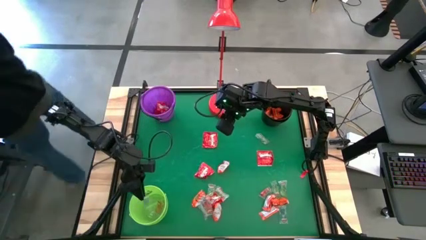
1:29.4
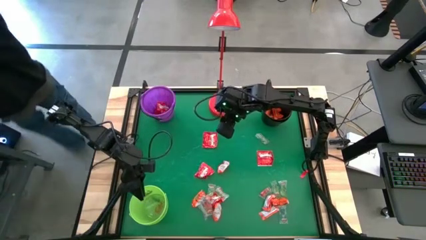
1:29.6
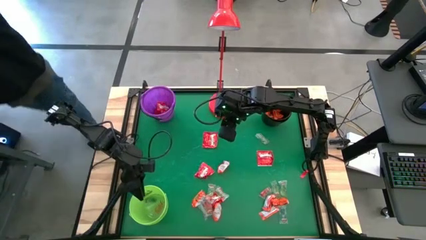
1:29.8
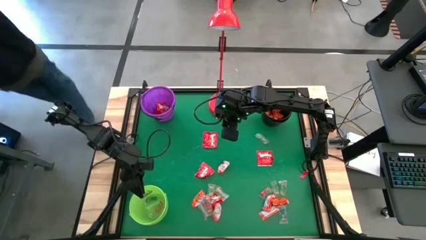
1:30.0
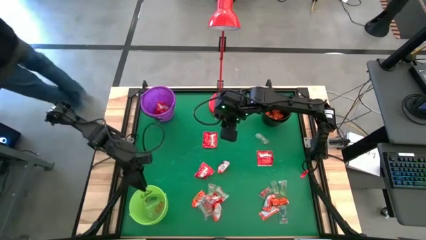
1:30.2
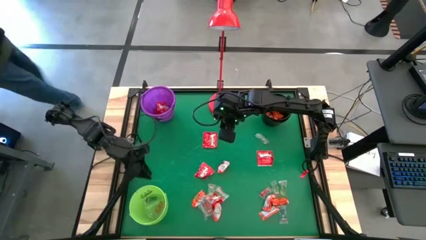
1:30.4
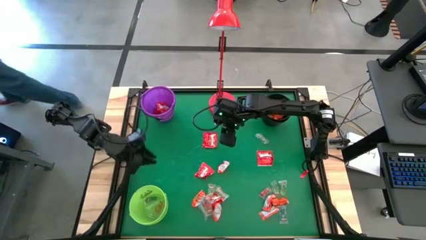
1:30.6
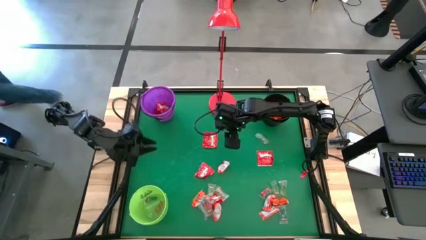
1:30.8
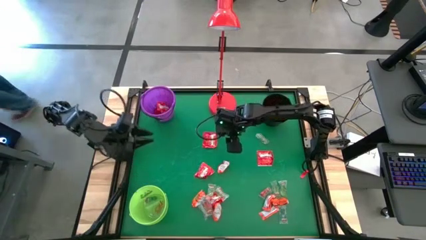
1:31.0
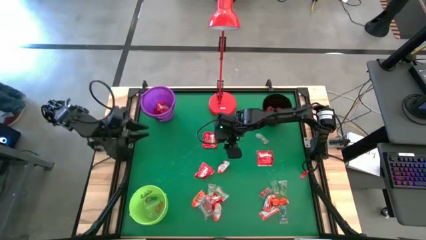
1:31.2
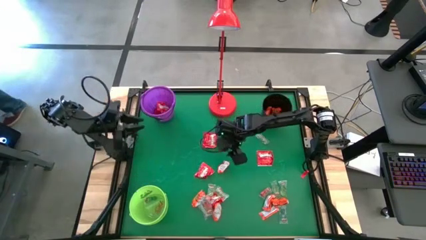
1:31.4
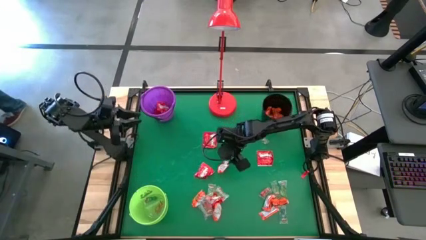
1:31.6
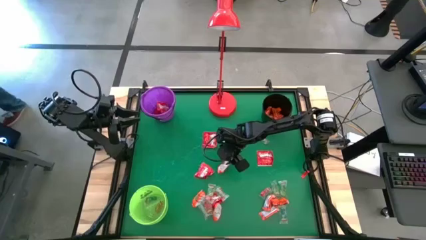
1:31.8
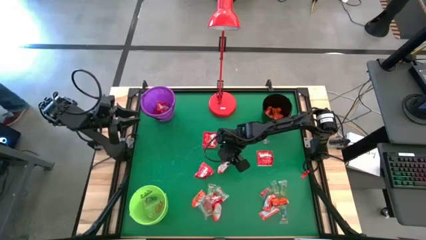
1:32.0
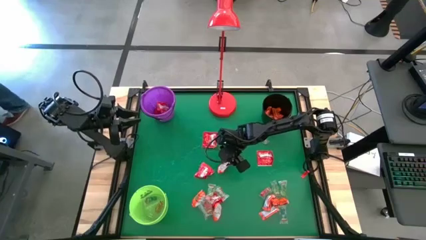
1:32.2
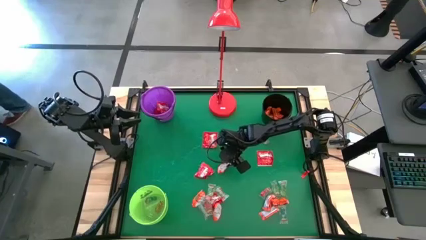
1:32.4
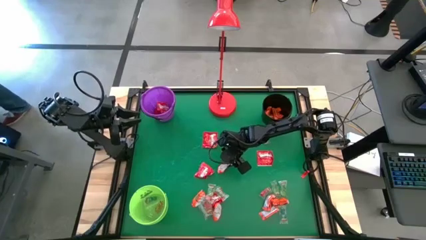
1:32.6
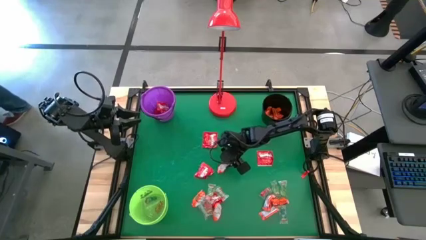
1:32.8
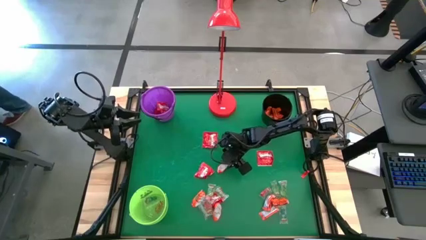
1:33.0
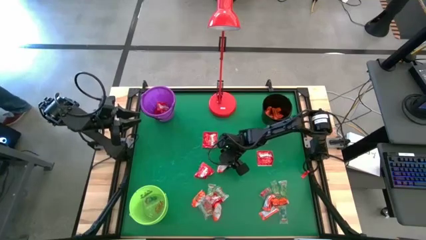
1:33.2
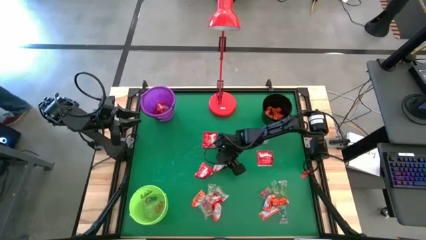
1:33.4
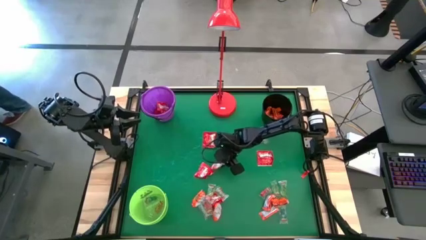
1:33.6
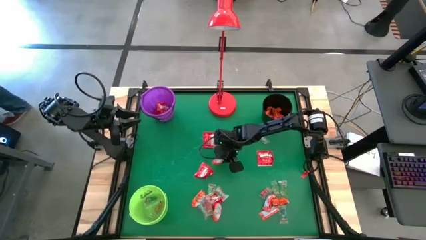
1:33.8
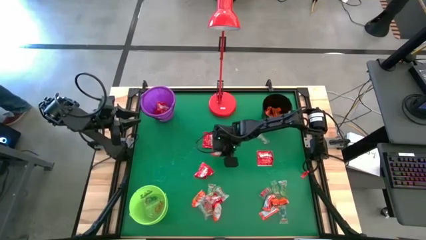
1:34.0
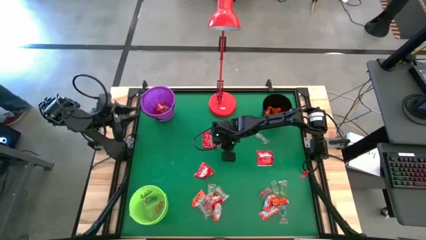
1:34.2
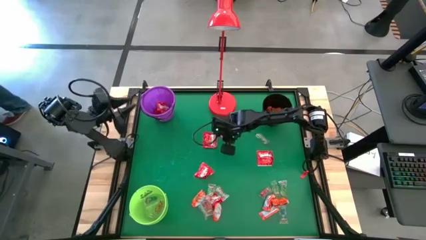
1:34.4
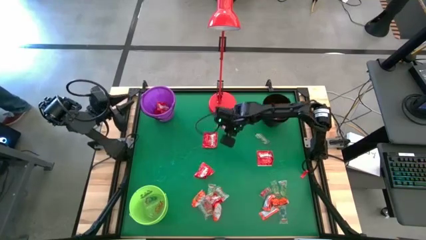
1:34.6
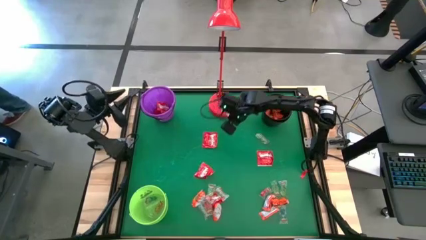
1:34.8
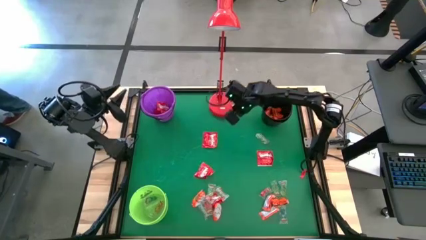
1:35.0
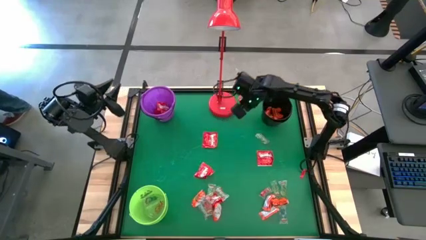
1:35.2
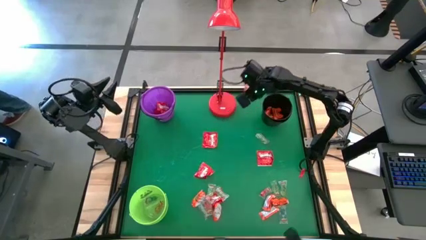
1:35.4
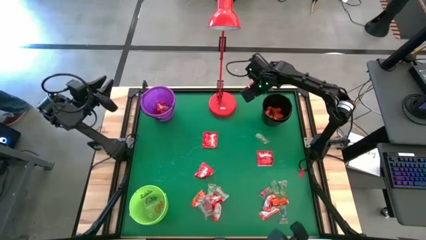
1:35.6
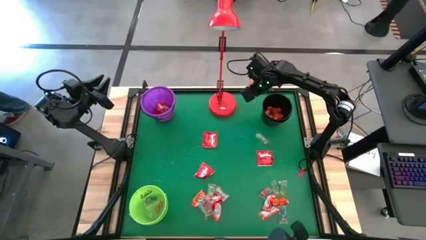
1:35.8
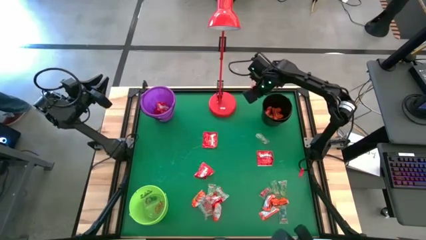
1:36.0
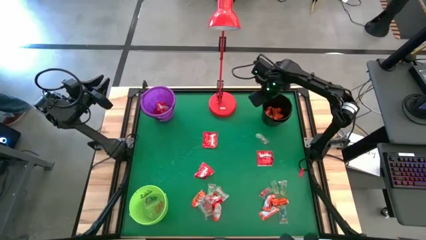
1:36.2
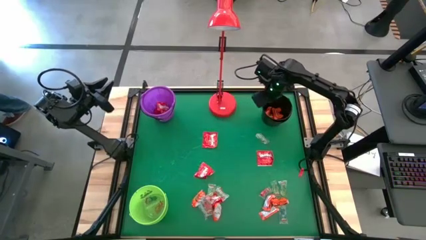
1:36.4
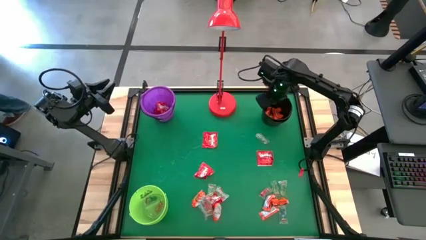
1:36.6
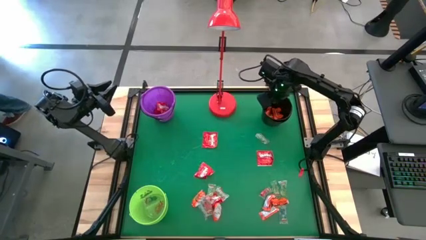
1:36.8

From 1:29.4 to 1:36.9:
Task: Sort candy
Put the orange chocolate into the black bucket

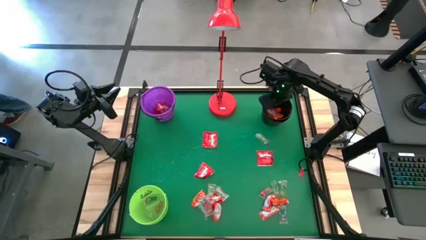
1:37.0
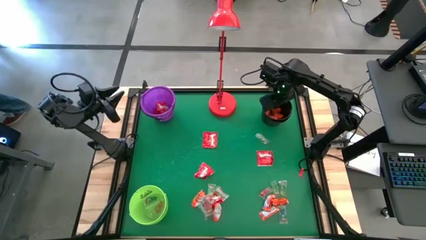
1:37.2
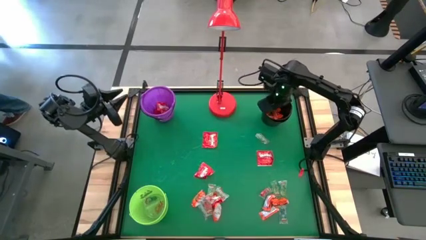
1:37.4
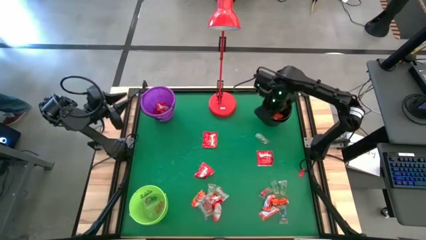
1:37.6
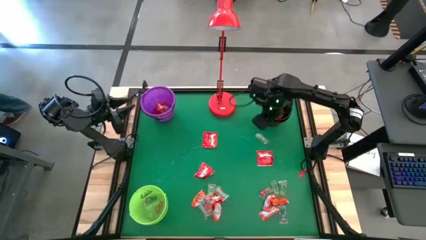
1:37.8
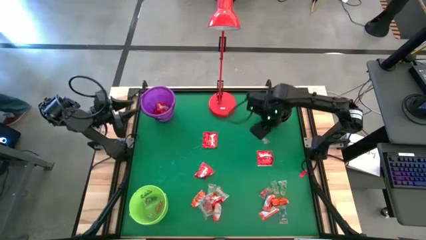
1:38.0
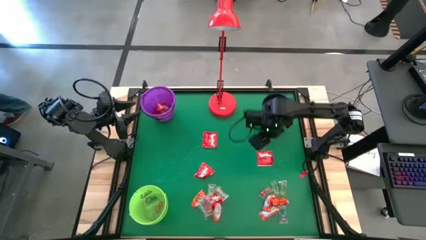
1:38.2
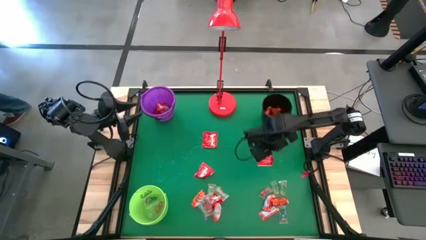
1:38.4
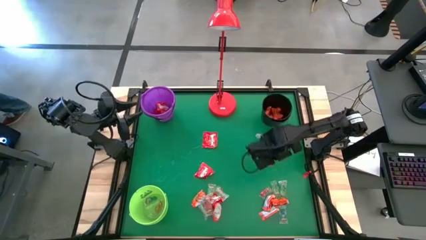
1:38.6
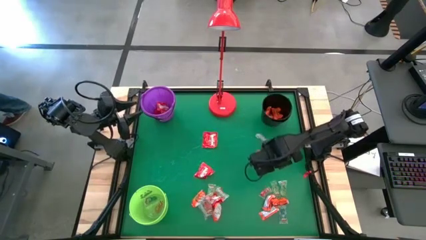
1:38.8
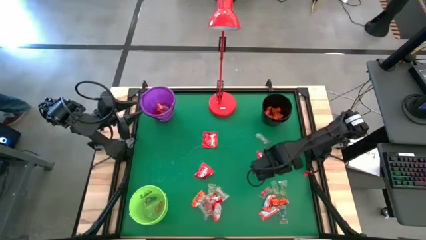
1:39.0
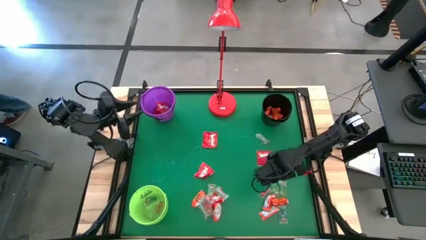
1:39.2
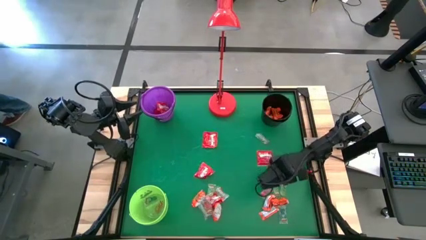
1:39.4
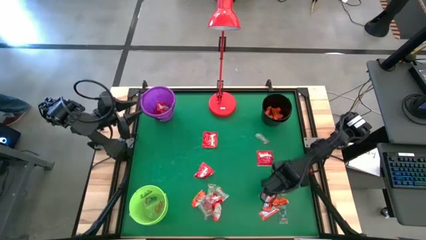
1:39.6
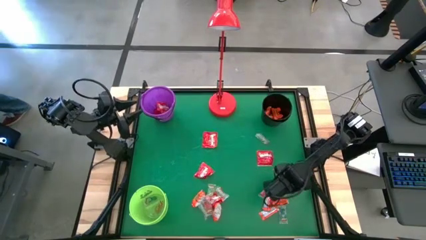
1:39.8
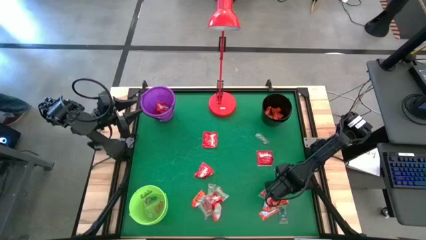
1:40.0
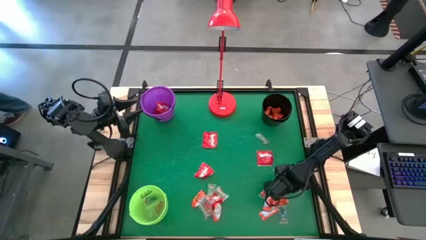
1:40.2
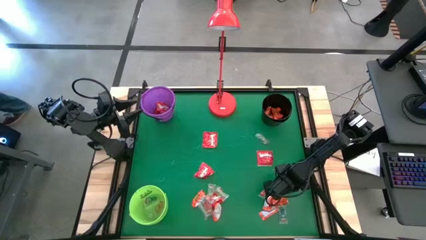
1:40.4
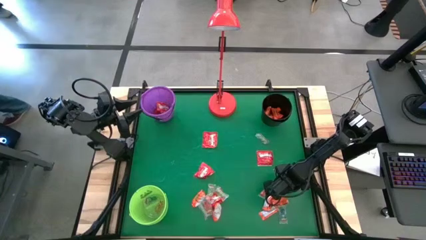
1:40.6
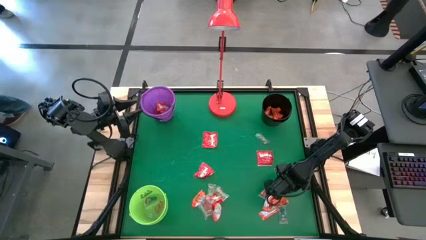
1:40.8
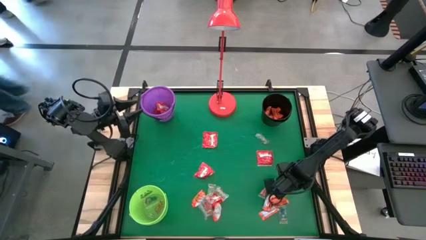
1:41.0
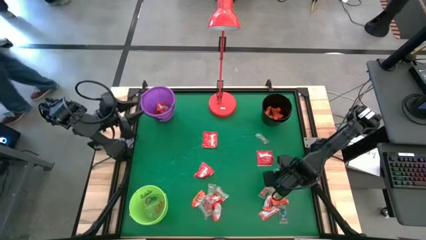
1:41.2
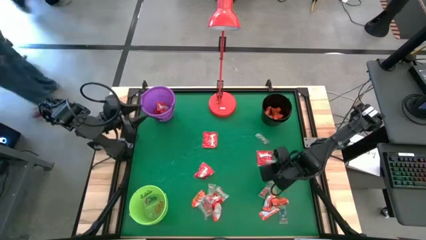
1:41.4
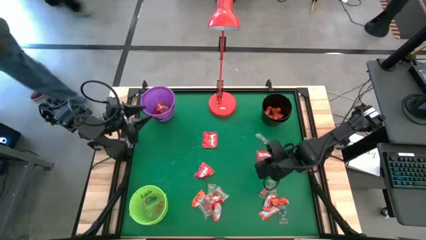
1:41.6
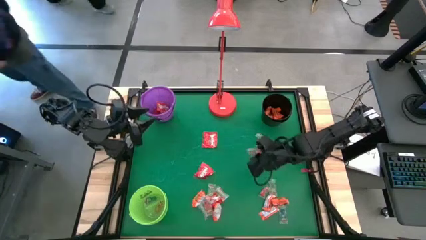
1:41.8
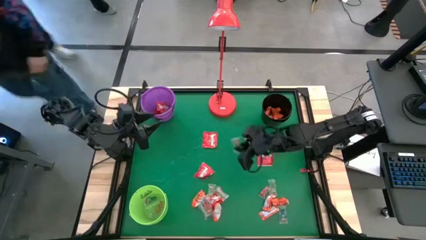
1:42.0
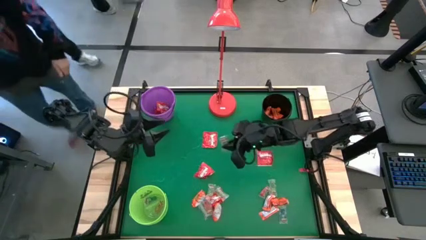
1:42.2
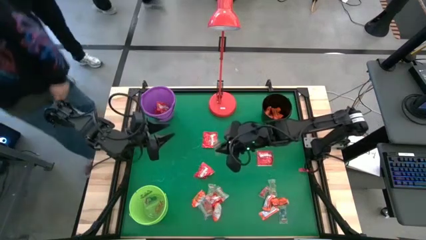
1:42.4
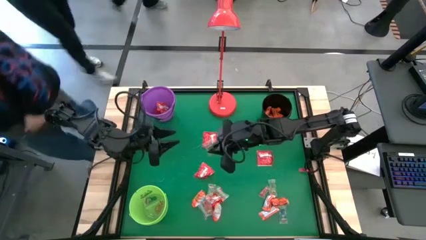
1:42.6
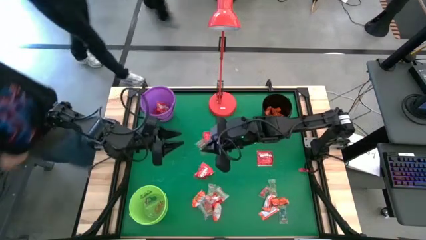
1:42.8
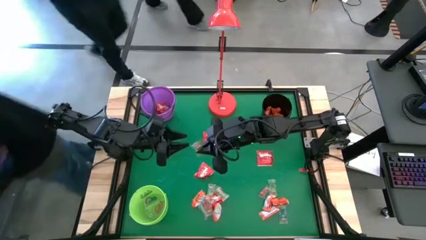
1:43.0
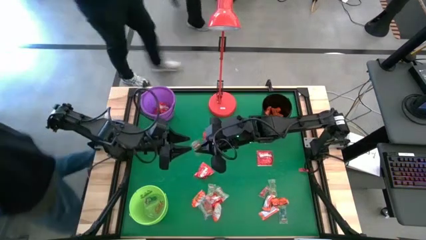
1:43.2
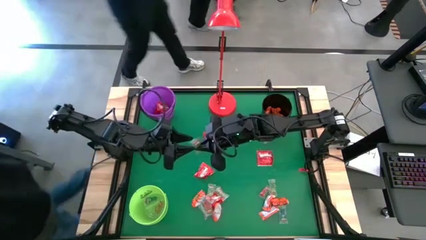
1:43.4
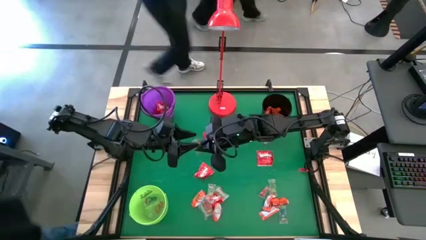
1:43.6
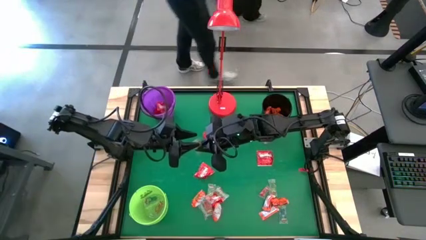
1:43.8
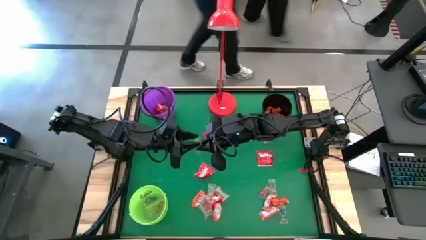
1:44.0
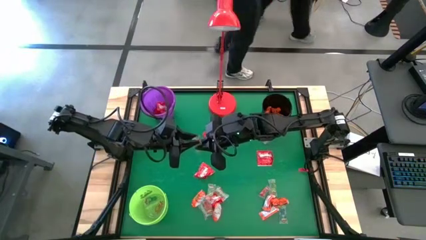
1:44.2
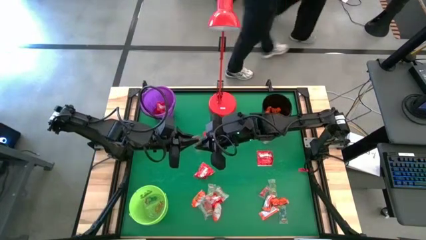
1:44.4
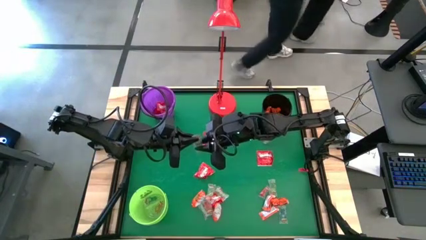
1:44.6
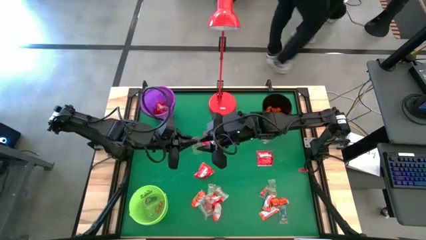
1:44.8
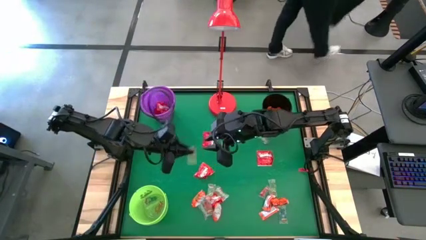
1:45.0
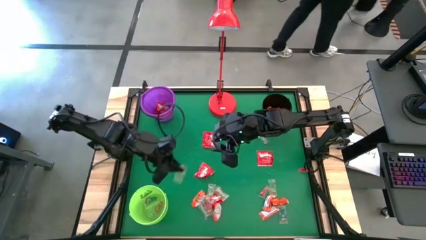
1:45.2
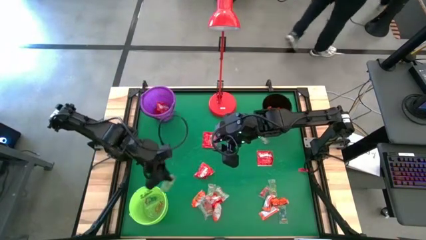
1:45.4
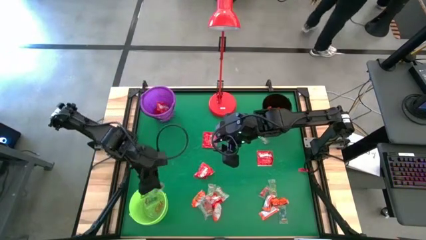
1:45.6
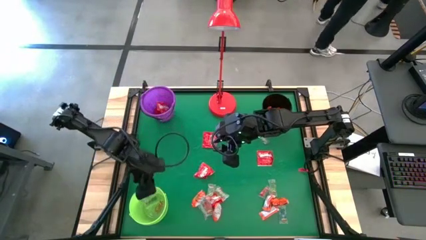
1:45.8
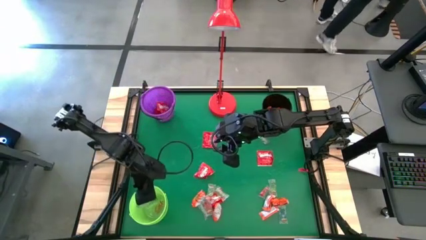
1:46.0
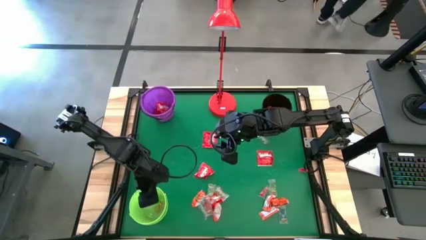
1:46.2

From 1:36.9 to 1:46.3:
Put the green gummy into the light green bucket
